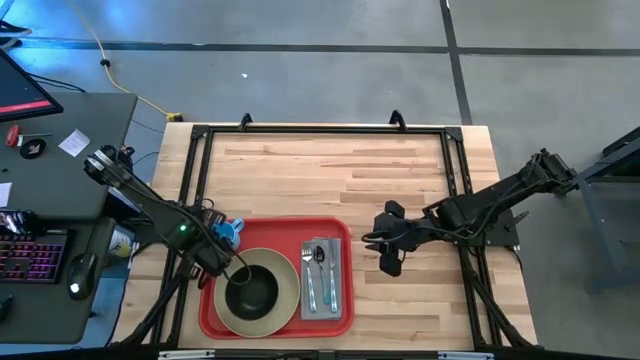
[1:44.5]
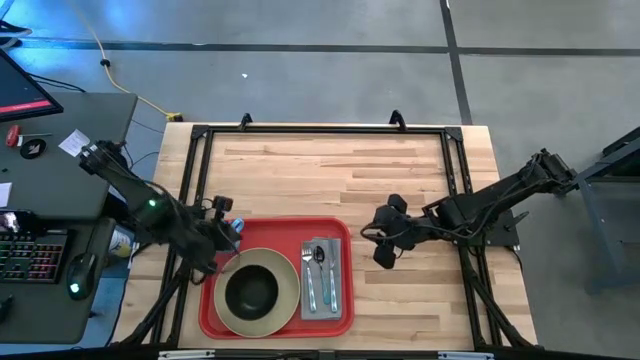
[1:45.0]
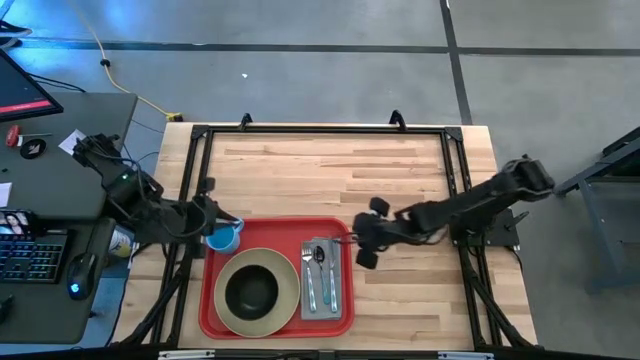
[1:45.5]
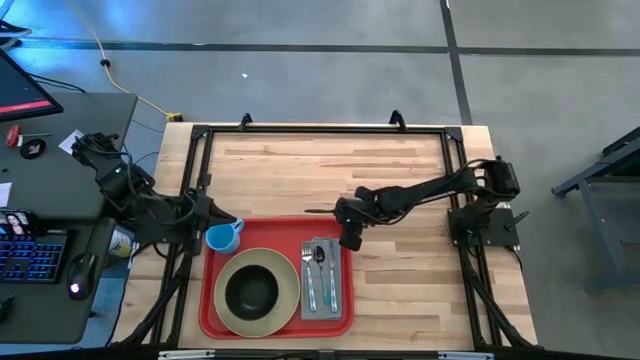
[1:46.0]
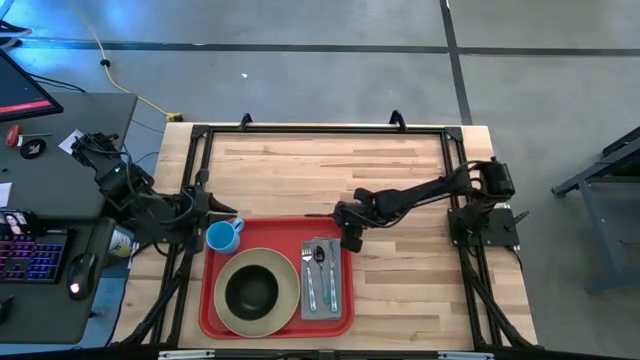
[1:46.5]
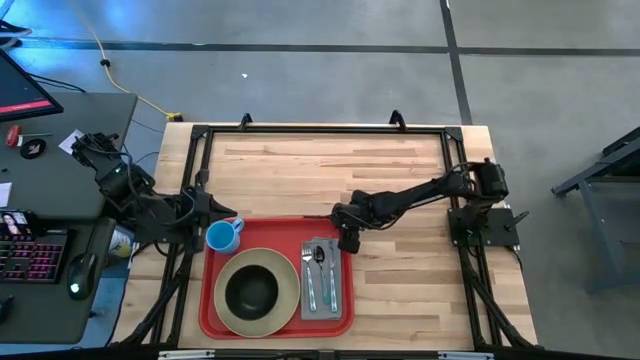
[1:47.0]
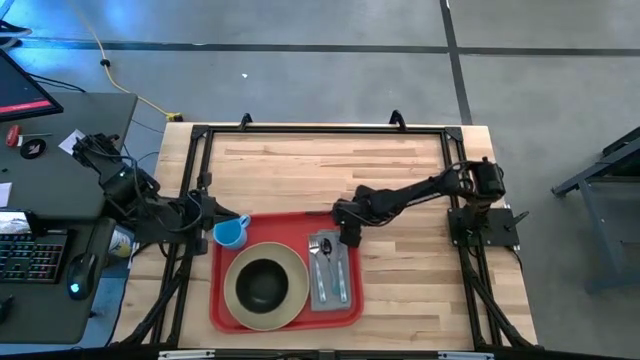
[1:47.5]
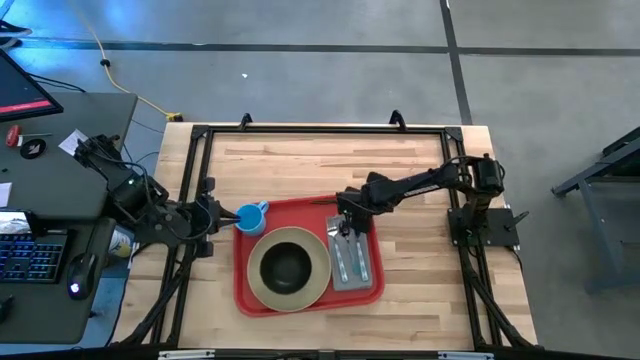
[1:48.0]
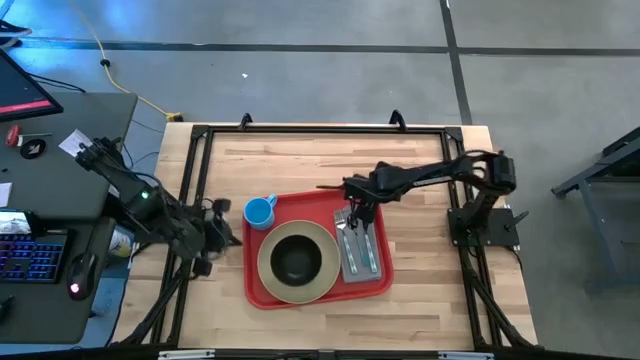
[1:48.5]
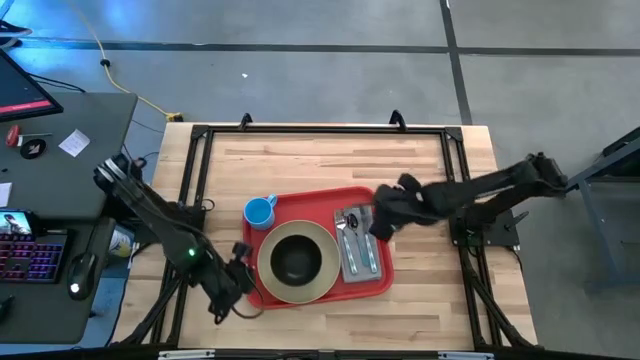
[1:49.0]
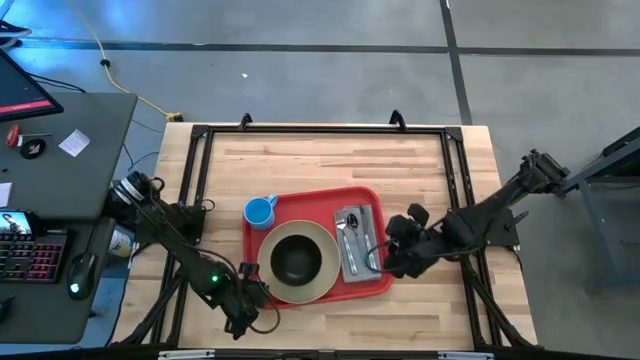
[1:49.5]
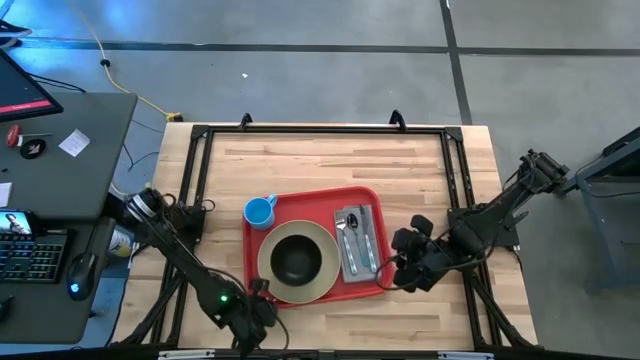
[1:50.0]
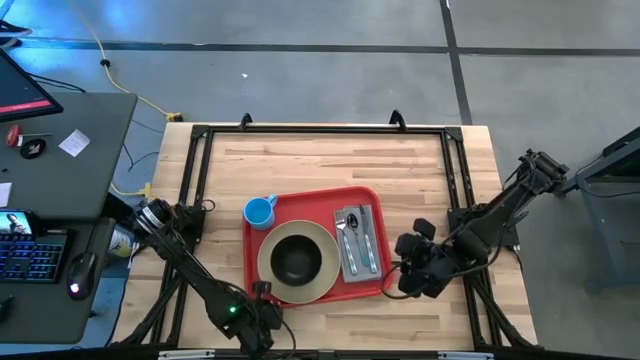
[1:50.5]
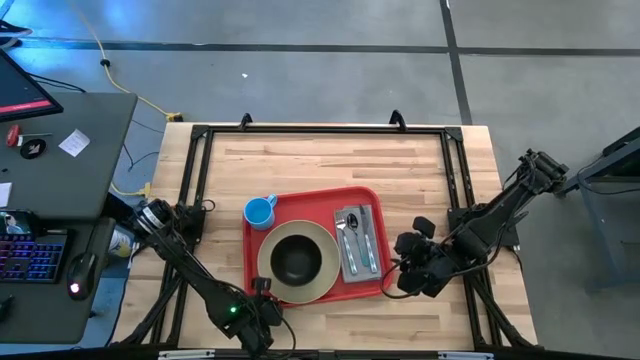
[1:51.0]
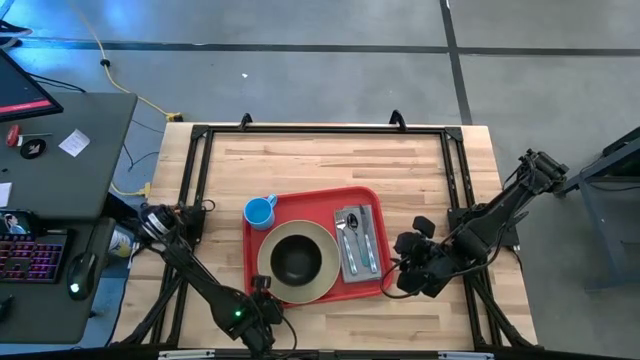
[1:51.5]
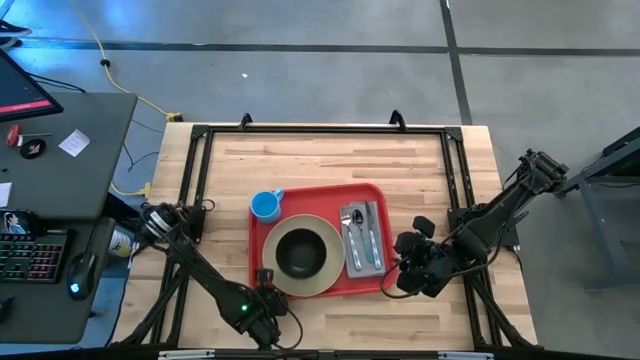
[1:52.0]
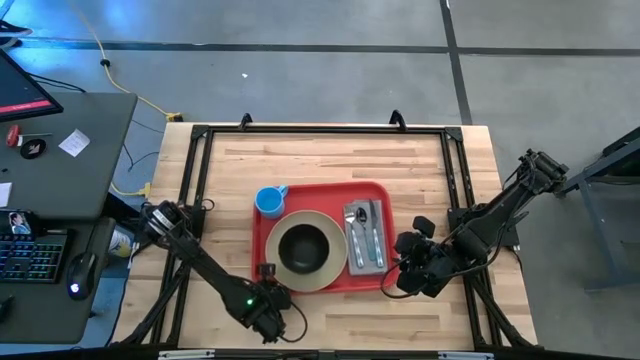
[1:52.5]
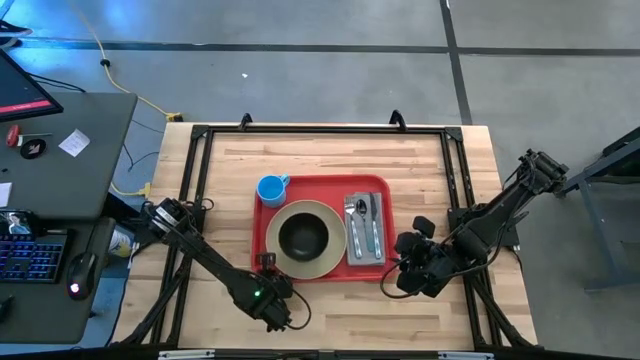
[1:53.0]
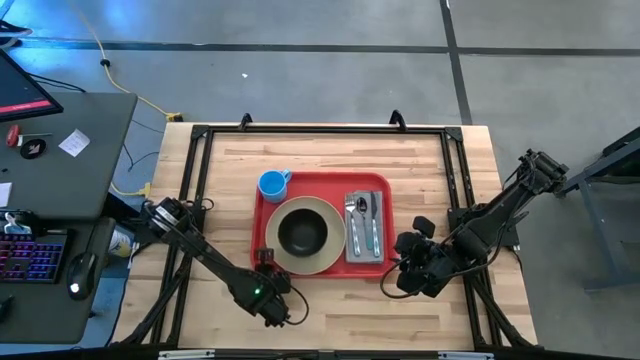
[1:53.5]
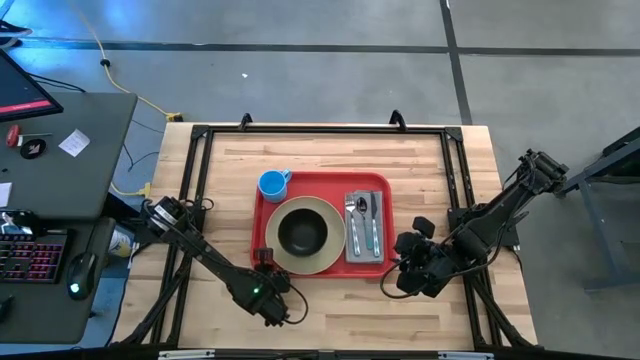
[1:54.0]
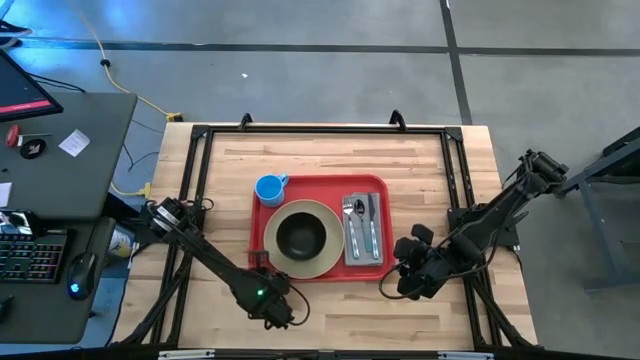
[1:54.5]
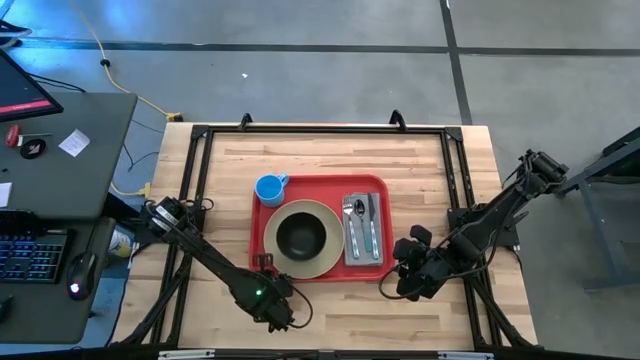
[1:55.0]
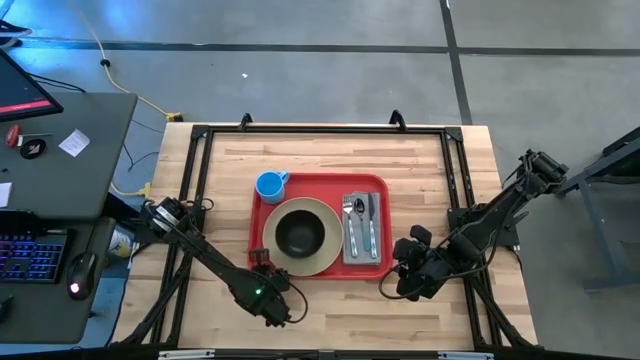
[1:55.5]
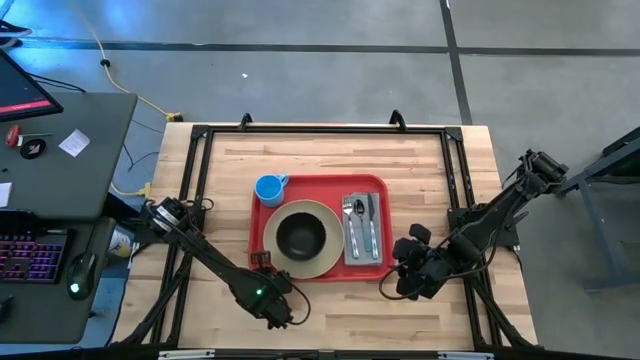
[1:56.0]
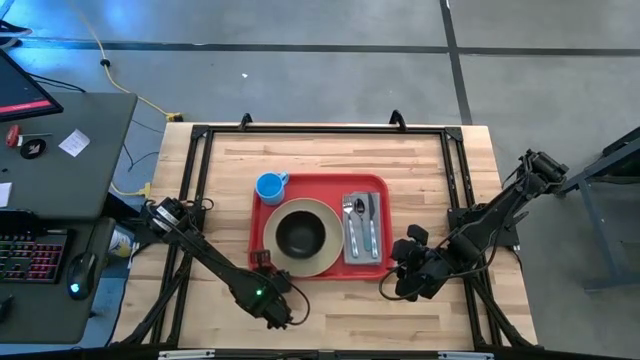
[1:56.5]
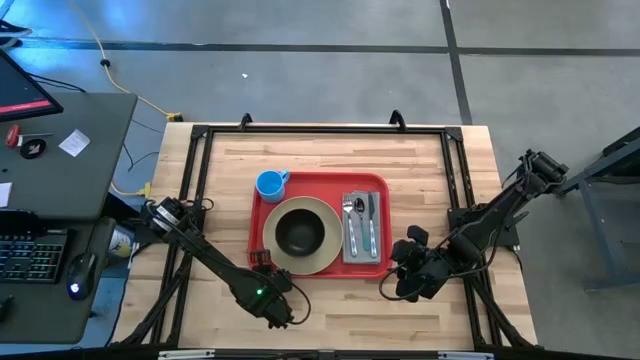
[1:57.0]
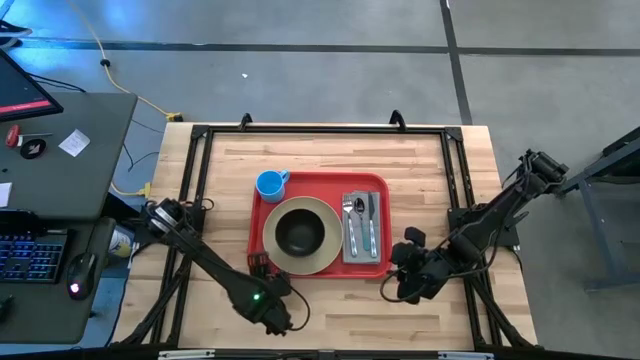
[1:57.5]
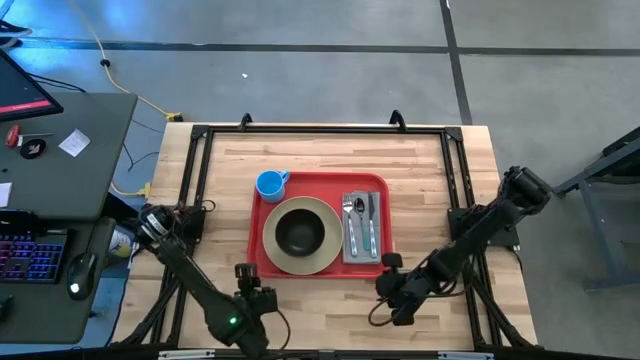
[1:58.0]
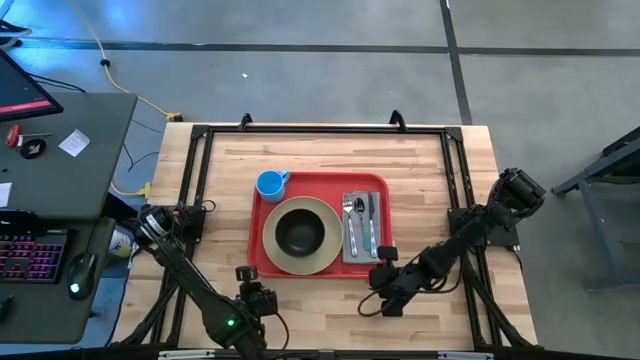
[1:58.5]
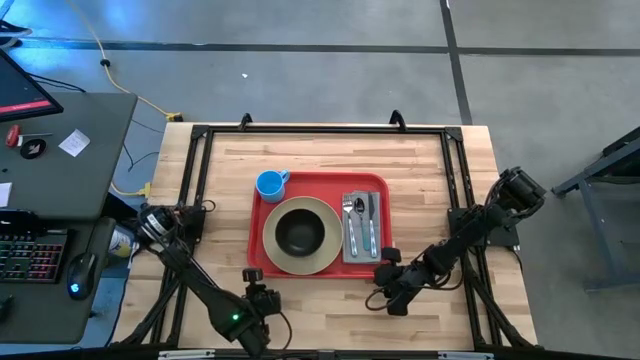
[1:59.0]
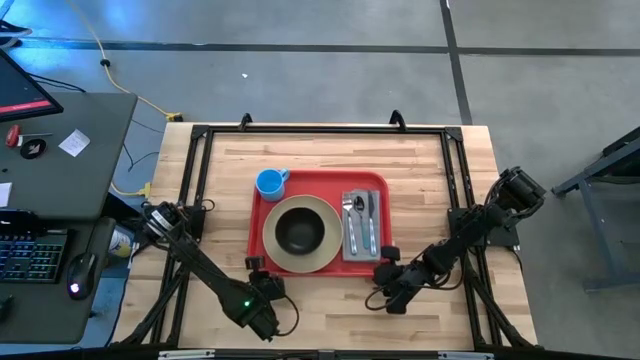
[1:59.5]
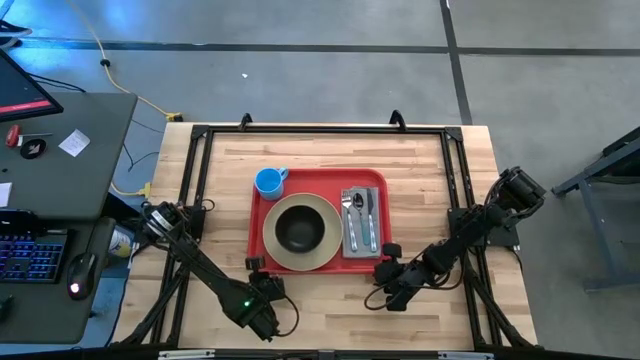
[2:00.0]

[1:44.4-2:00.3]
Task: Set up tray
Move the red serving tray to the middle of the table

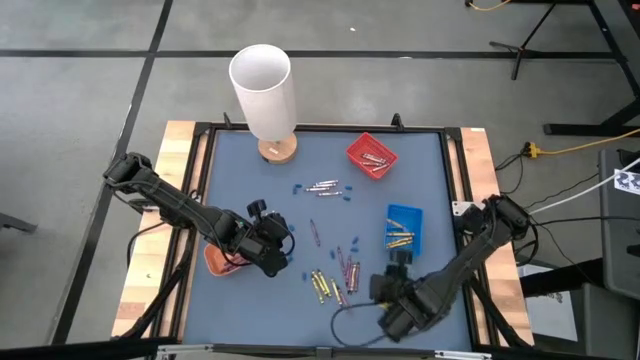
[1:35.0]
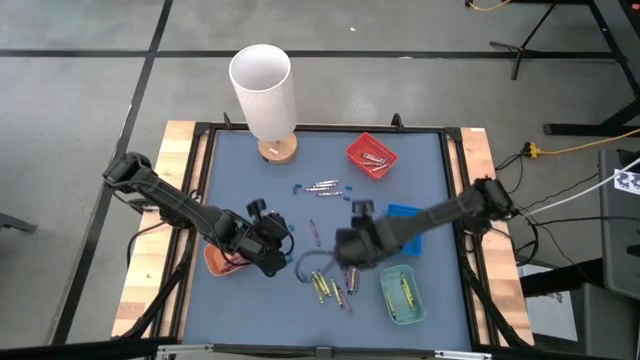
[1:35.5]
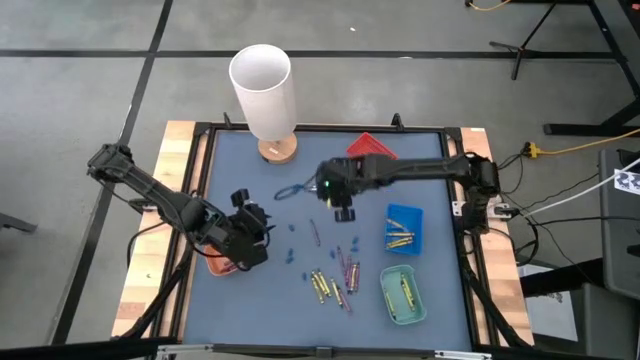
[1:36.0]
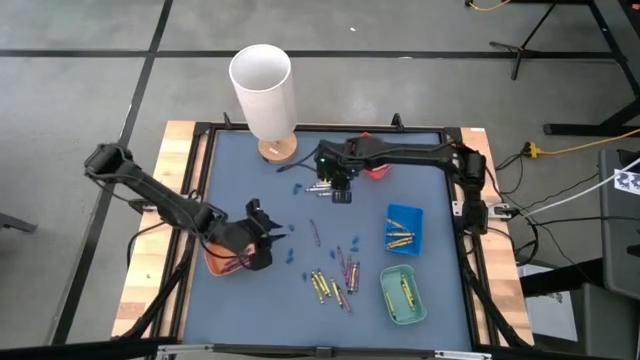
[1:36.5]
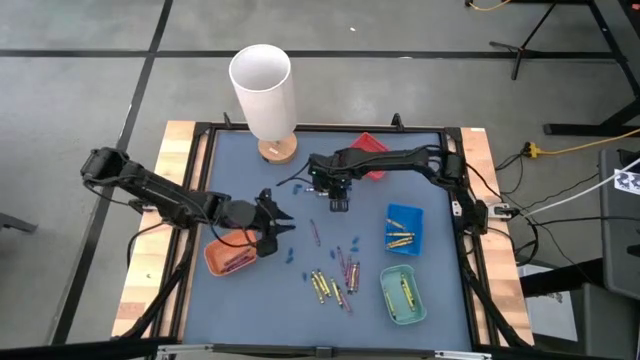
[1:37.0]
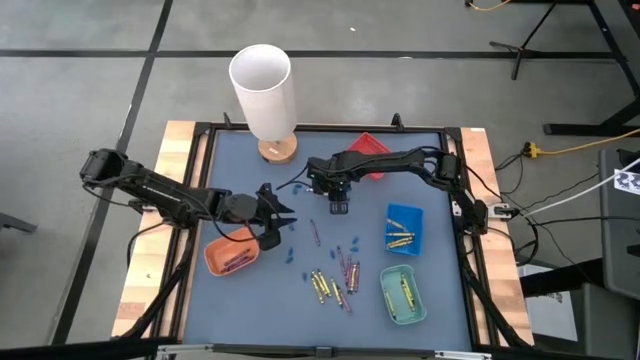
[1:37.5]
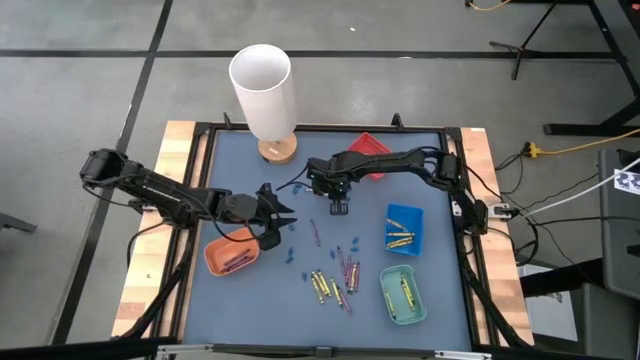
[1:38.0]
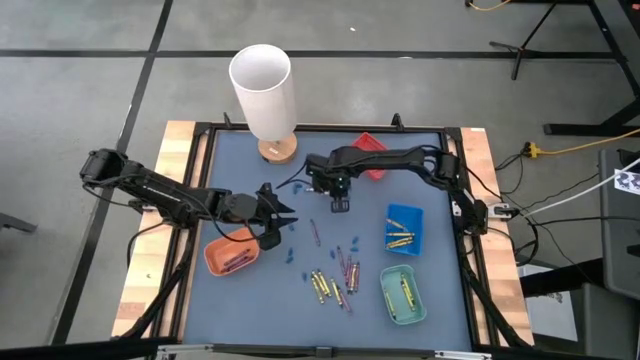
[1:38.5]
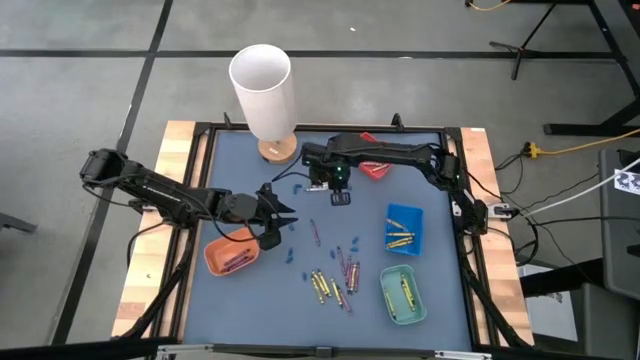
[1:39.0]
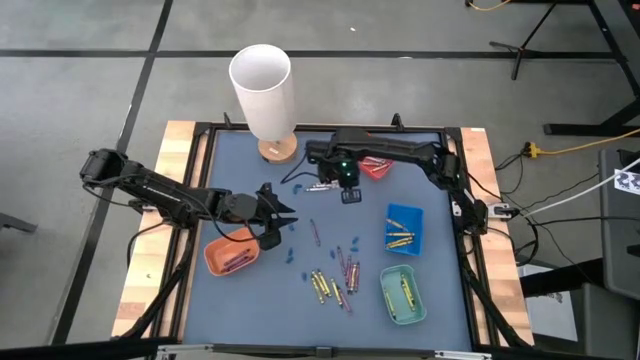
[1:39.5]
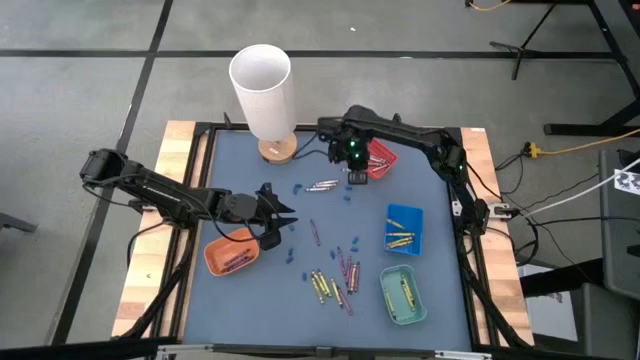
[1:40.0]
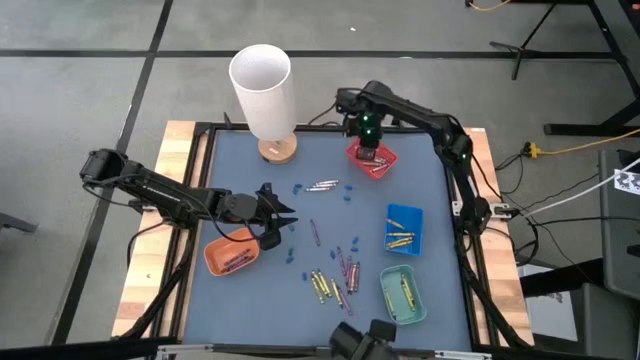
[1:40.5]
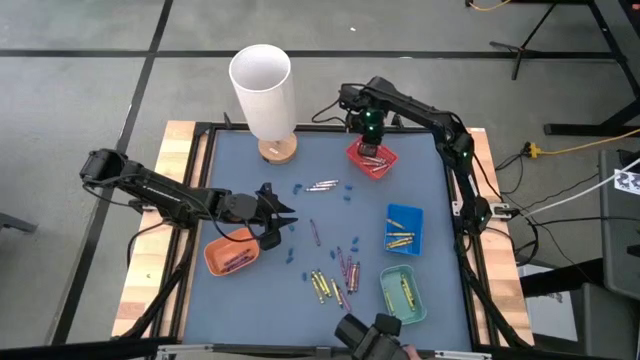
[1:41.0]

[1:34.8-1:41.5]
Task: Sort crayons
Put the grey crayon into the red bin
